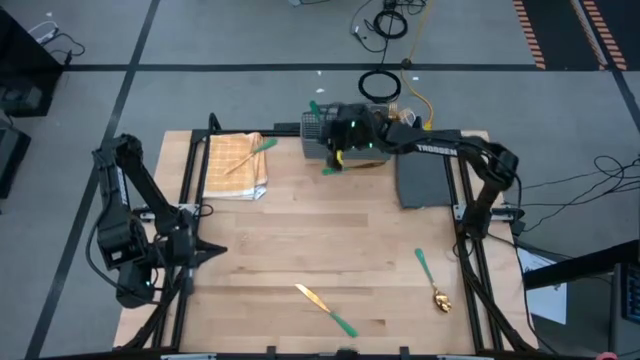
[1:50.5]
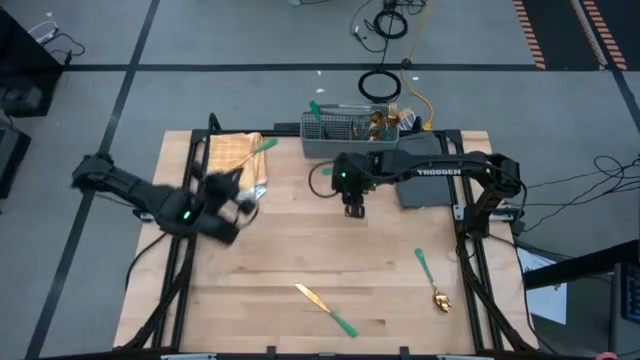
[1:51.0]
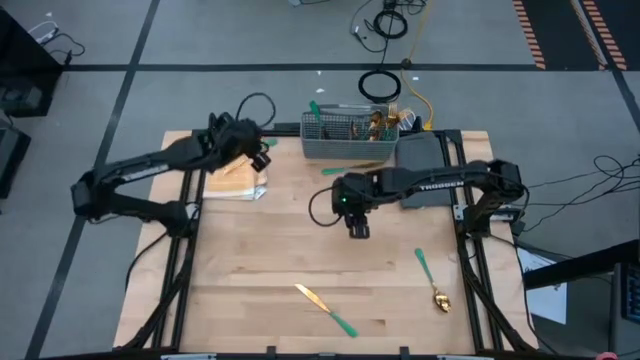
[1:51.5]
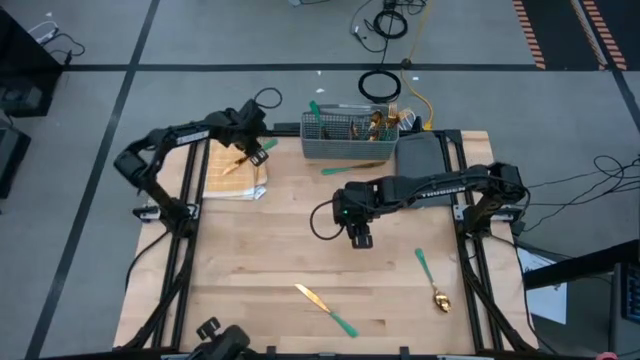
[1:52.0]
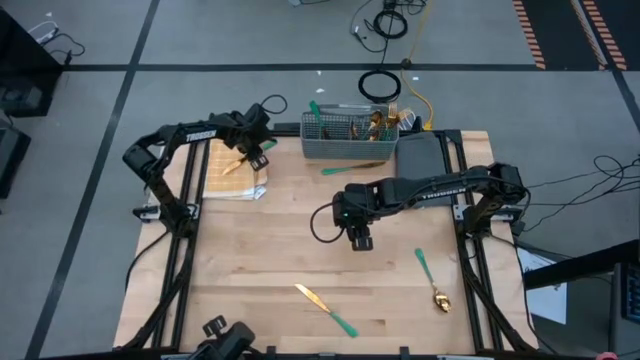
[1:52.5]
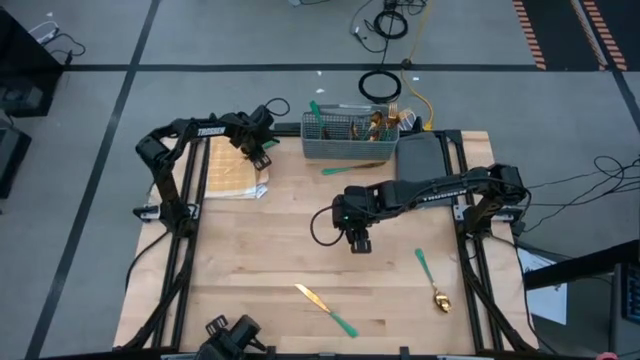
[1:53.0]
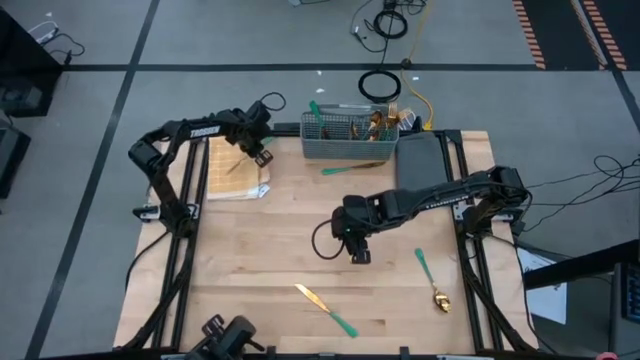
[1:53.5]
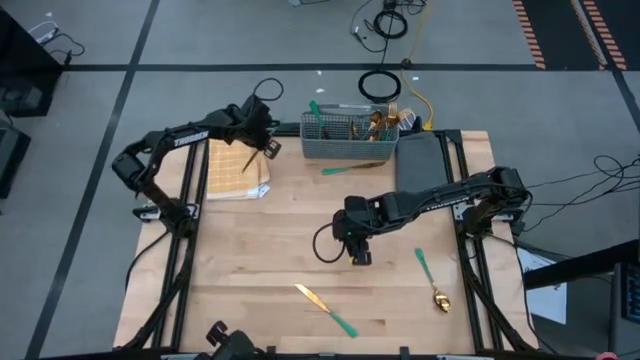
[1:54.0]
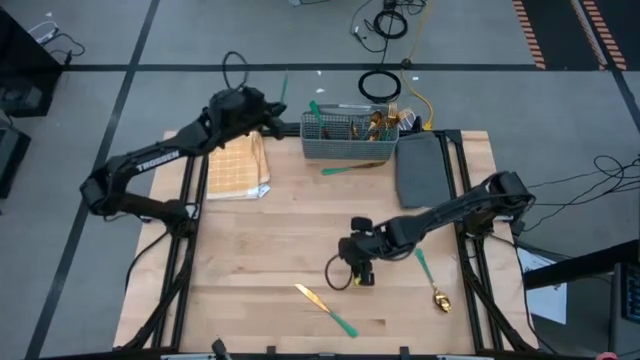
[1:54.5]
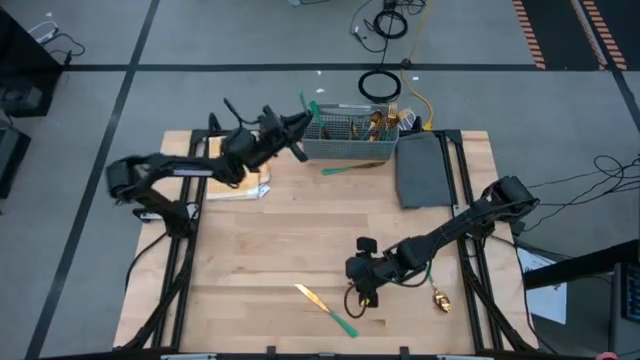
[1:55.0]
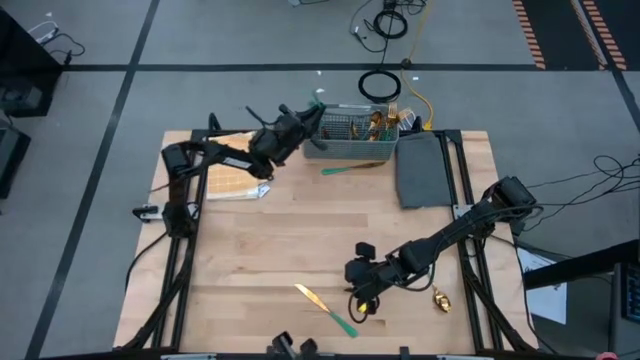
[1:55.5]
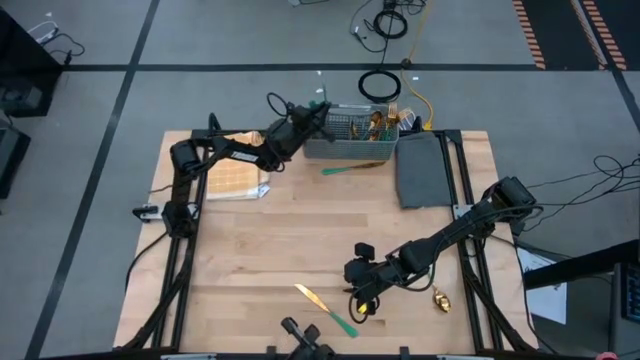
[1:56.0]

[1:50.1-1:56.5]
Task: Sort silverware
Put the knife into the middle left section of the dish rack

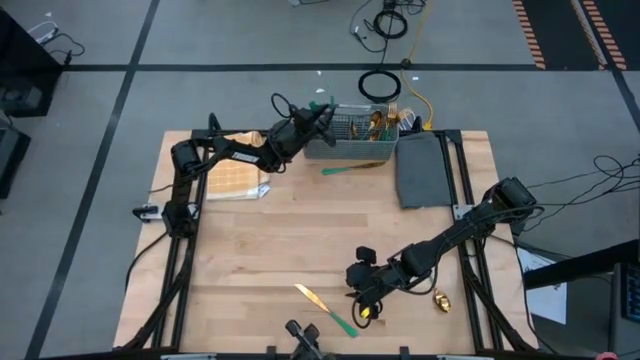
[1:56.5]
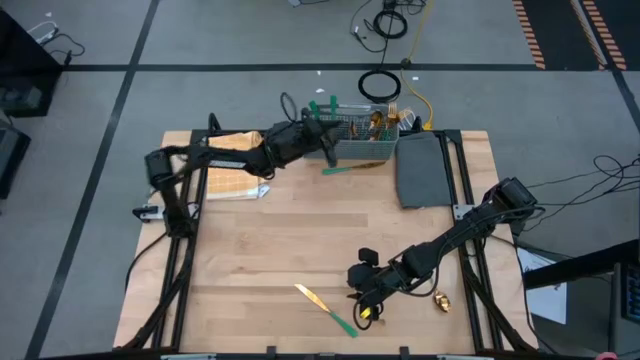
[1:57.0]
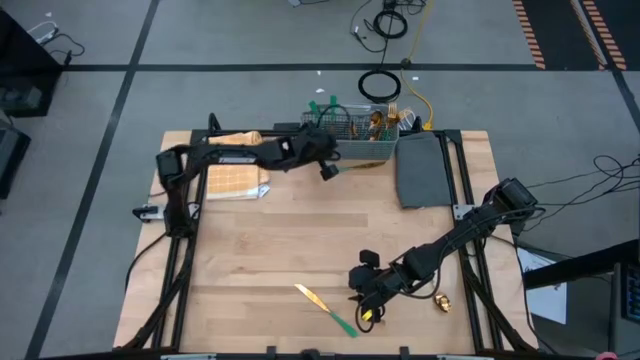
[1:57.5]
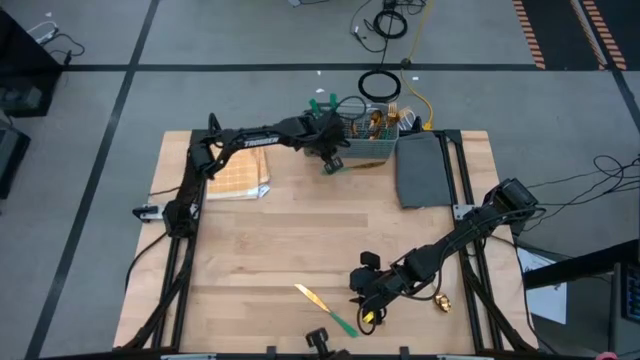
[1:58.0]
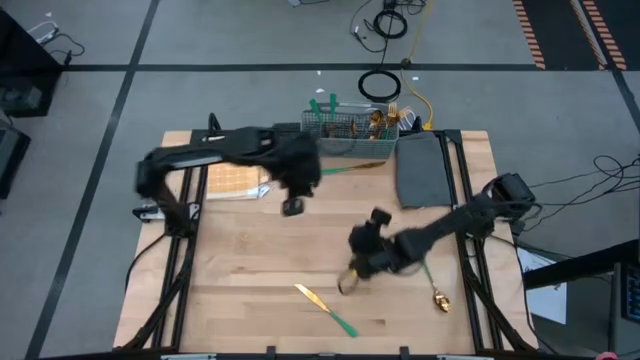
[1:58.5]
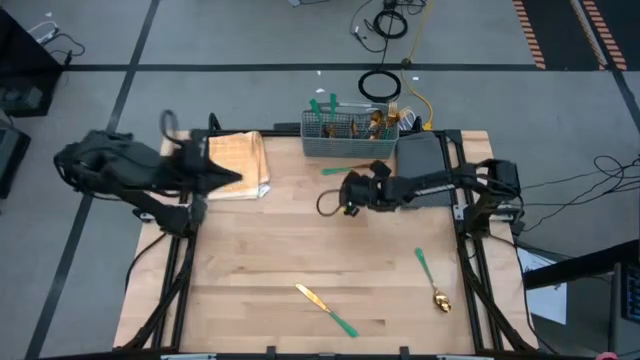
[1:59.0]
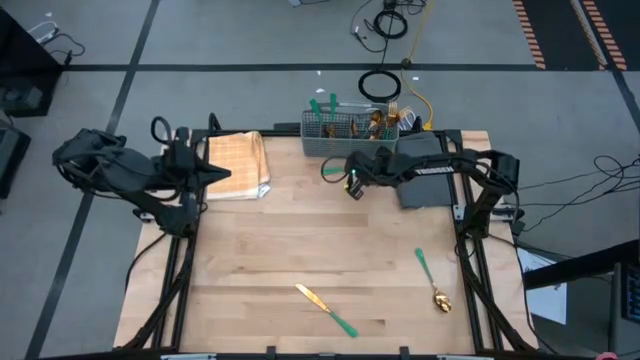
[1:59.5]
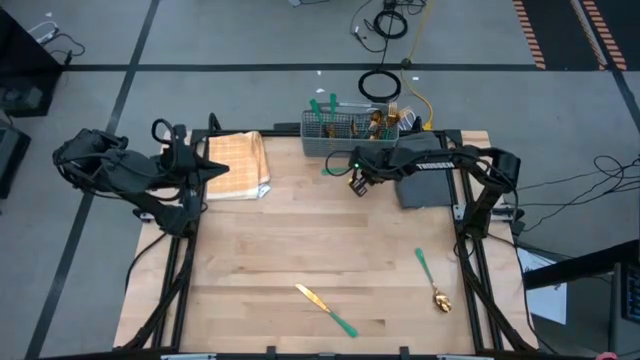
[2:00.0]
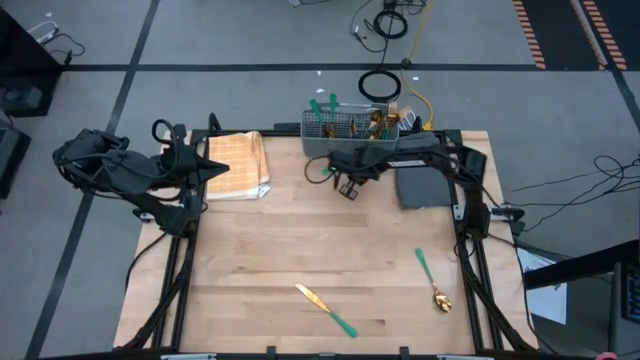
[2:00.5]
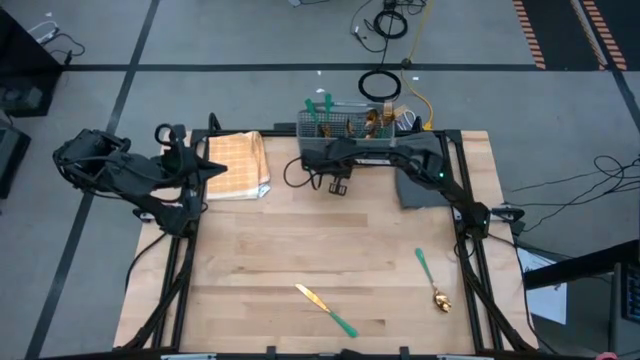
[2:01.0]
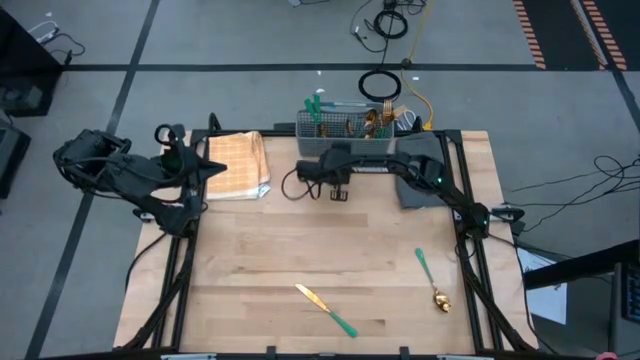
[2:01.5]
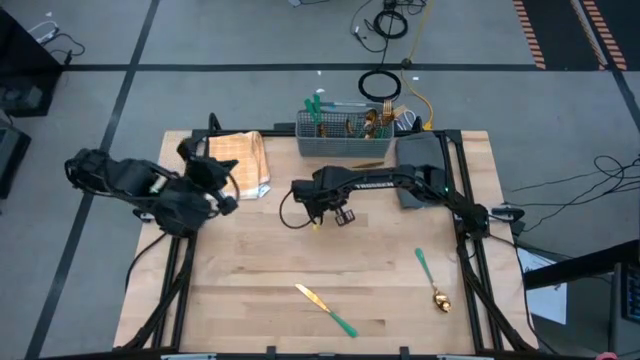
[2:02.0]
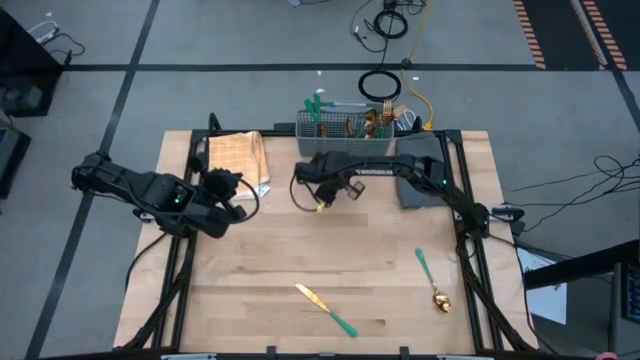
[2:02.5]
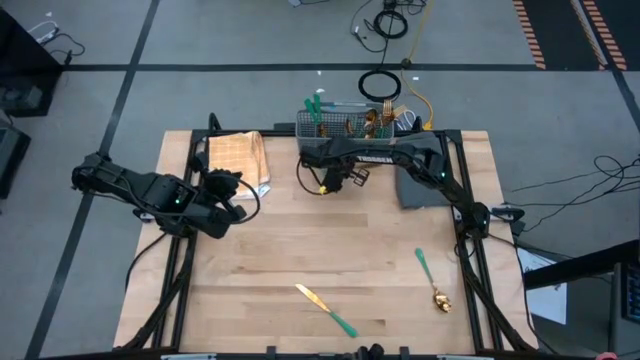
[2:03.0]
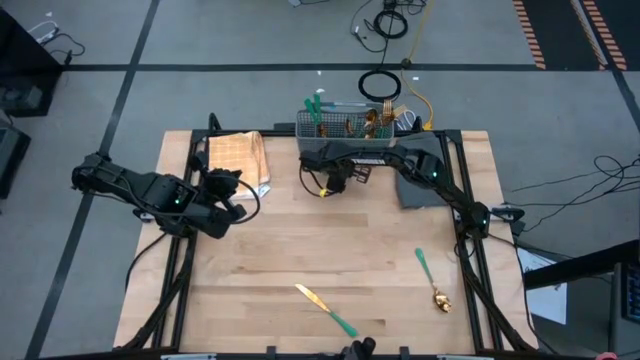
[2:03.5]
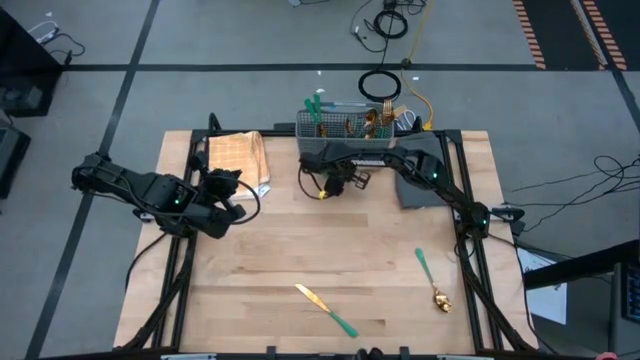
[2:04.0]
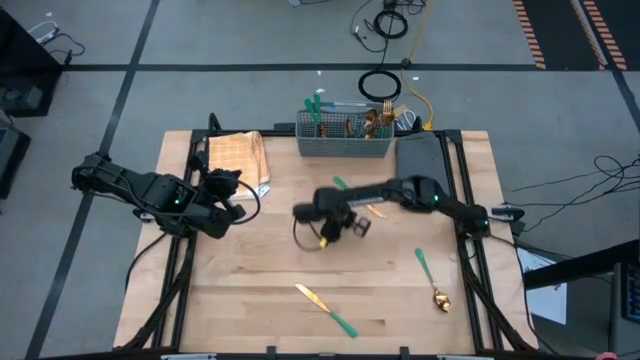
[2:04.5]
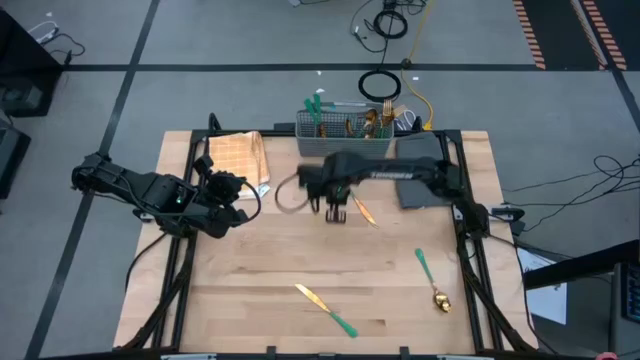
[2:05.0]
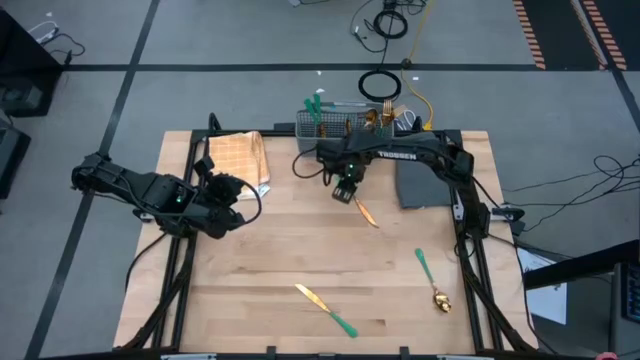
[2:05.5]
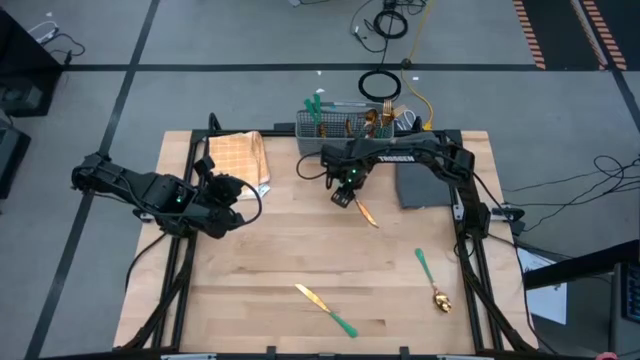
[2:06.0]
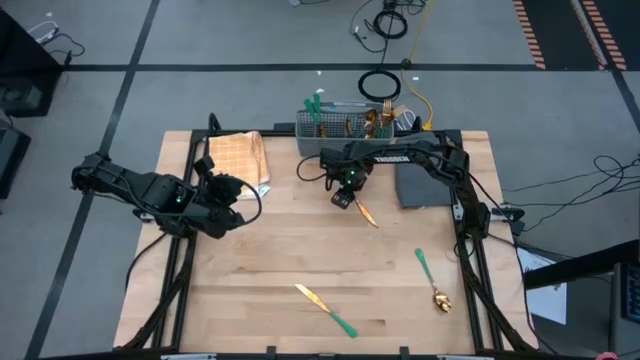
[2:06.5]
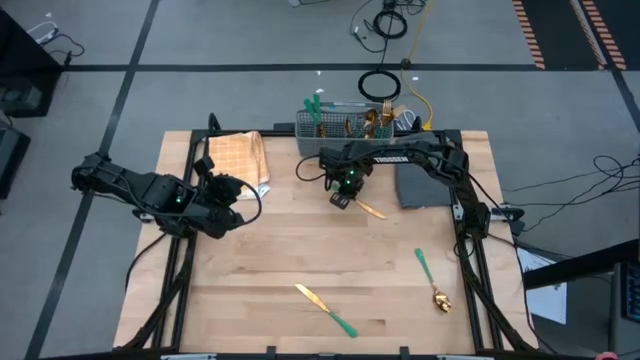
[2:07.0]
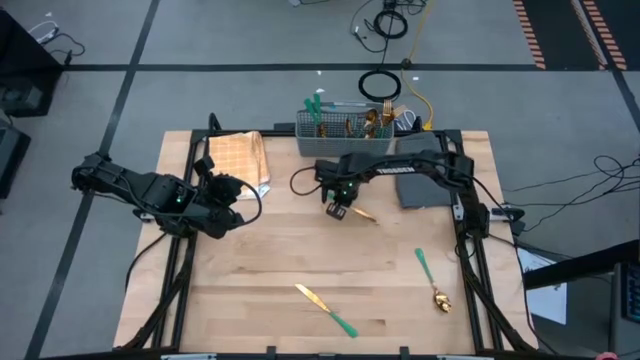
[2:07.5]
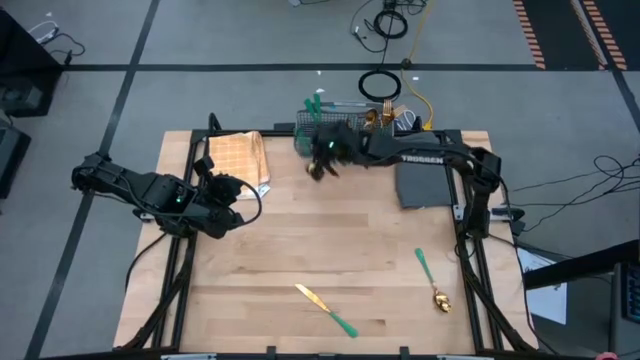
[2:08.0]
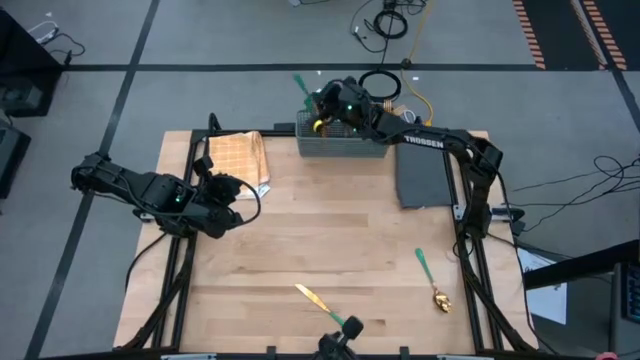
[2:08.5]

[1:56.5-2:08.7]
Put the knife into the middle left section of the dish rack

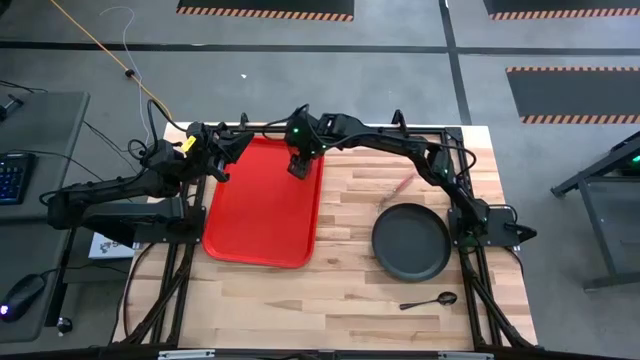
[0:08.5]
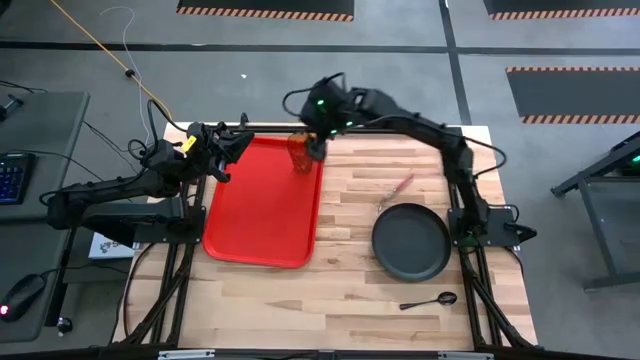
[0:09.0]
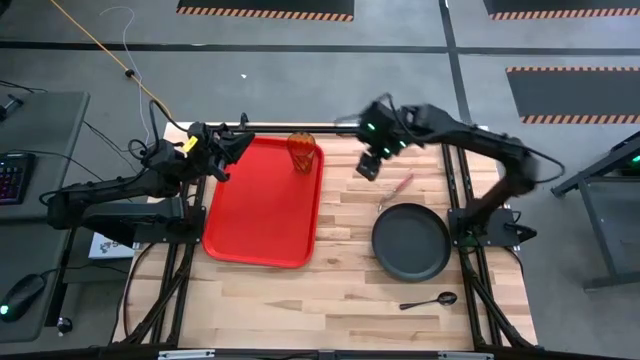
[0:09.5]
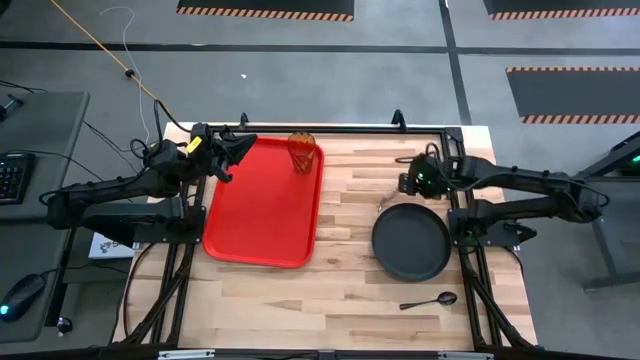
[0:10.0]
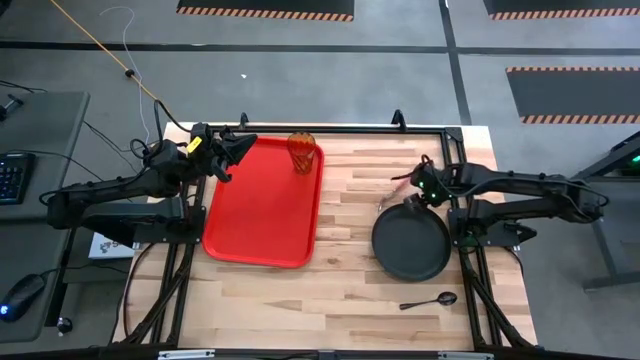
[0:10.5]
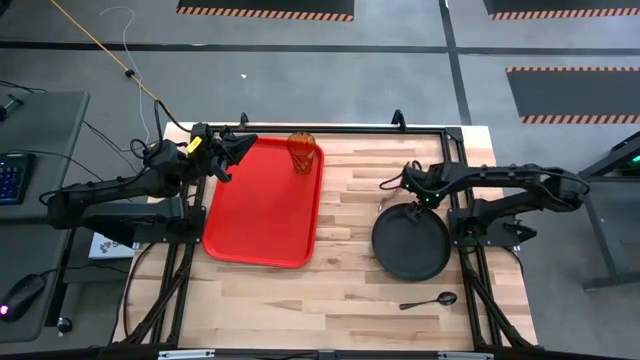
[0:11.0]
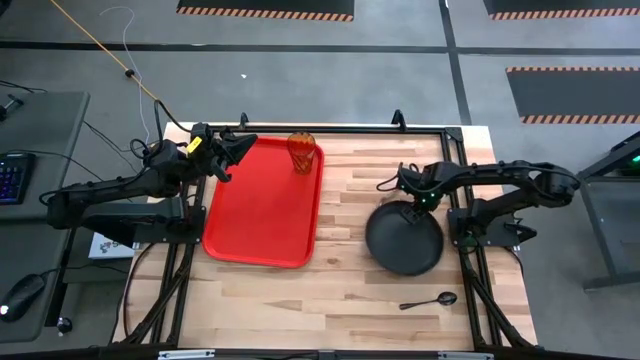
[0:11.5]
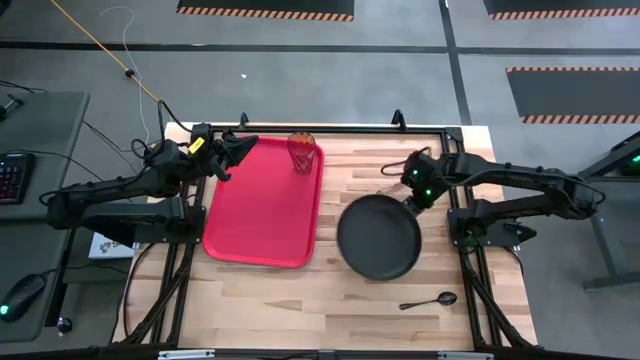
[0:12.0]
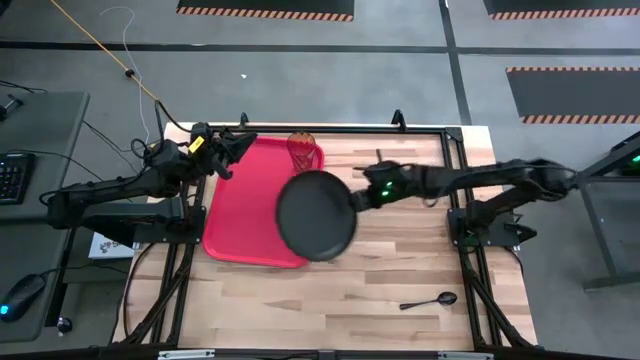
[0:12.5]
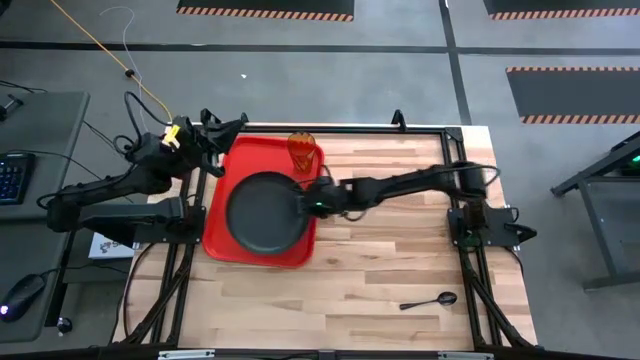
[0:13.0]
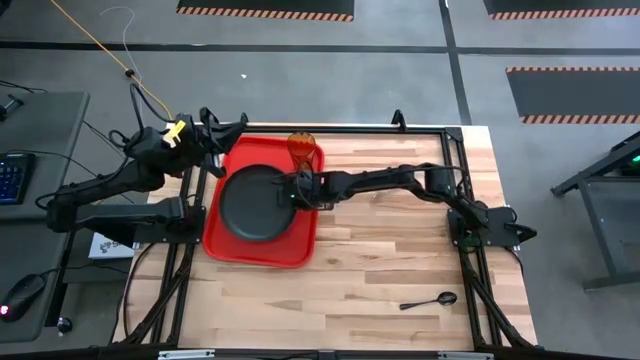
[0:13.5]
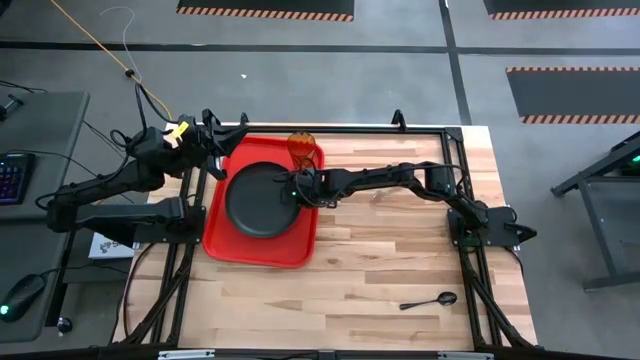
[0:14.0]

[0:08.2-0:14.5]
Task: Pick and place plate/cup/fork/spoon on tray
Put the black plate on the red tray to the top left of the brown cup
